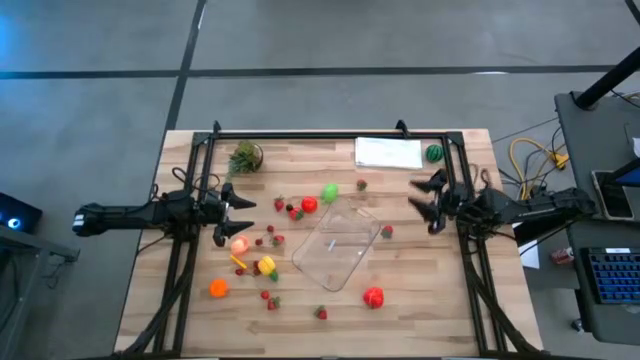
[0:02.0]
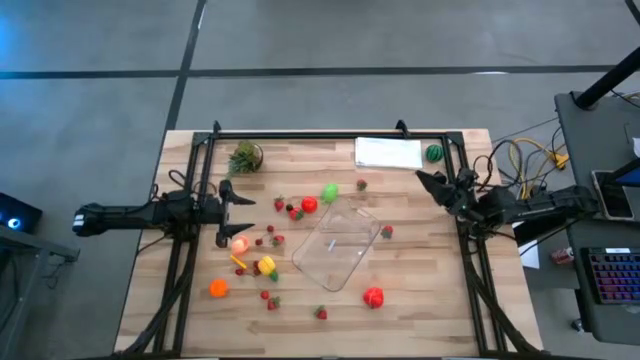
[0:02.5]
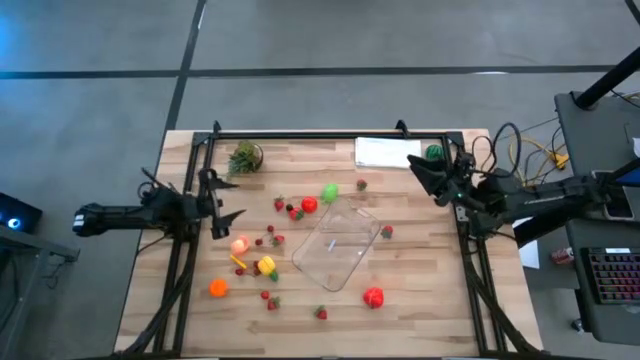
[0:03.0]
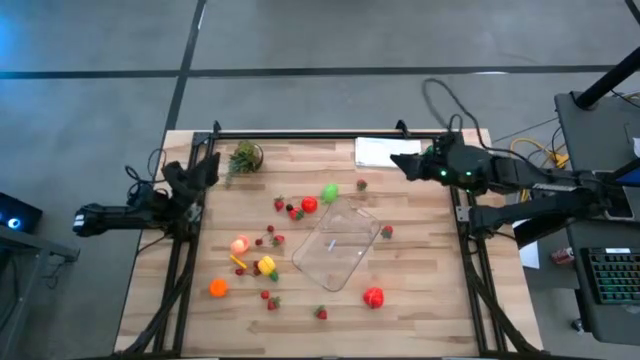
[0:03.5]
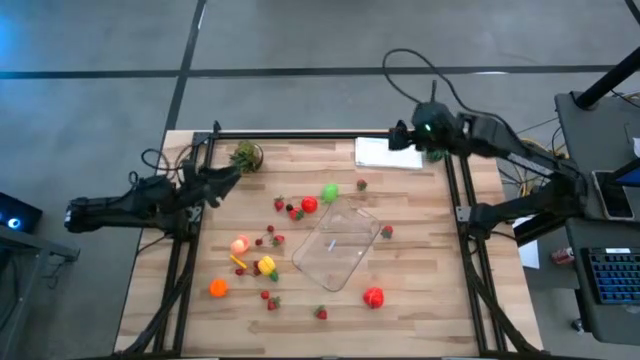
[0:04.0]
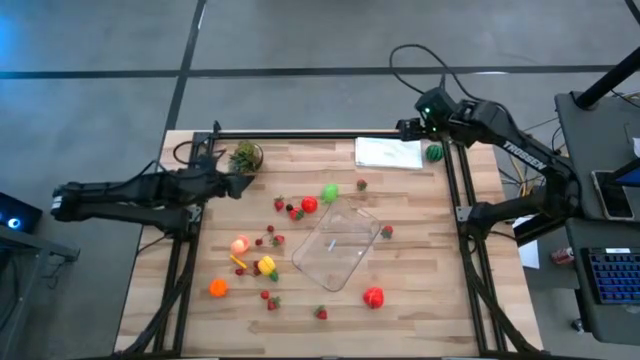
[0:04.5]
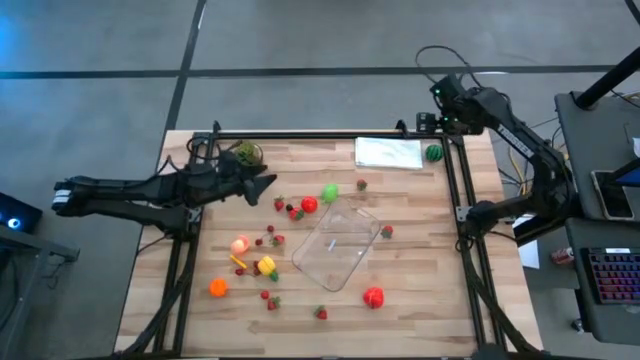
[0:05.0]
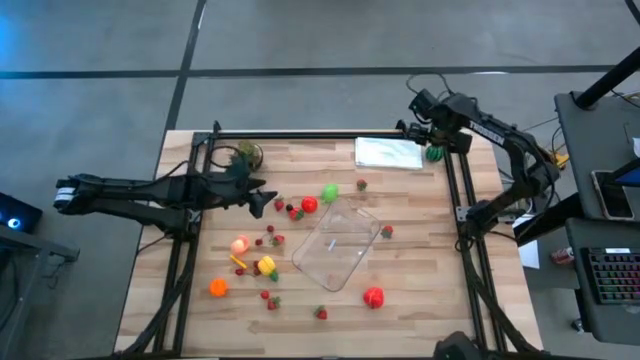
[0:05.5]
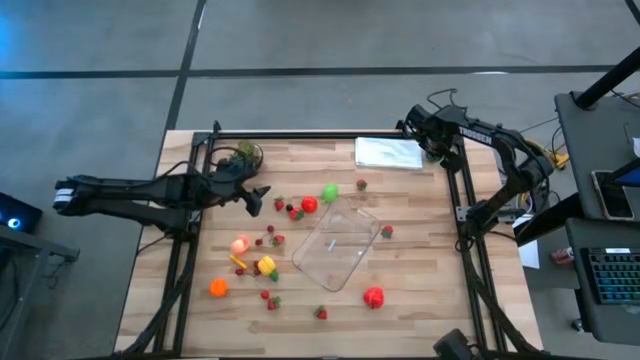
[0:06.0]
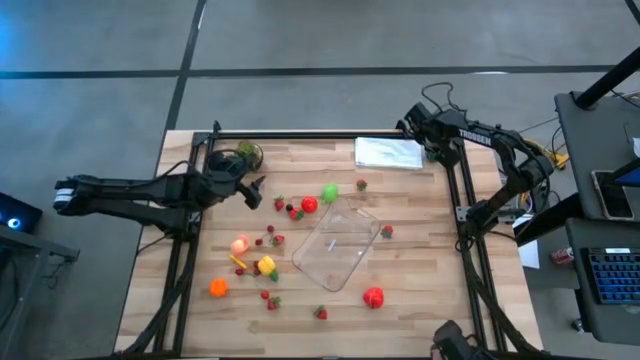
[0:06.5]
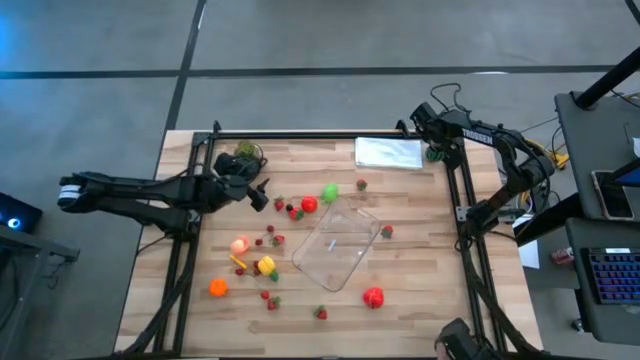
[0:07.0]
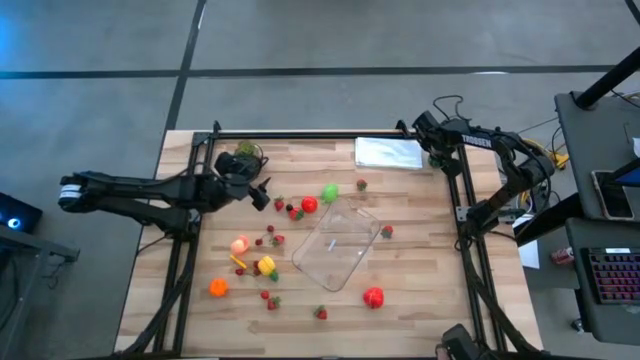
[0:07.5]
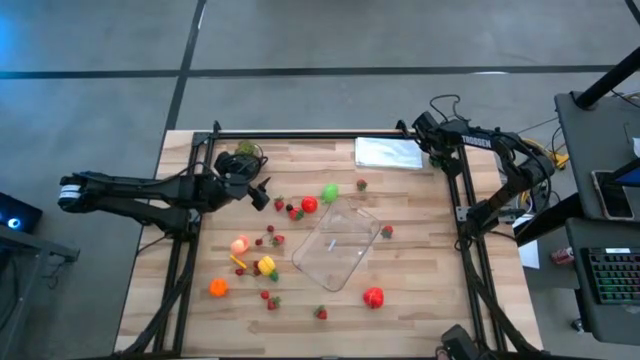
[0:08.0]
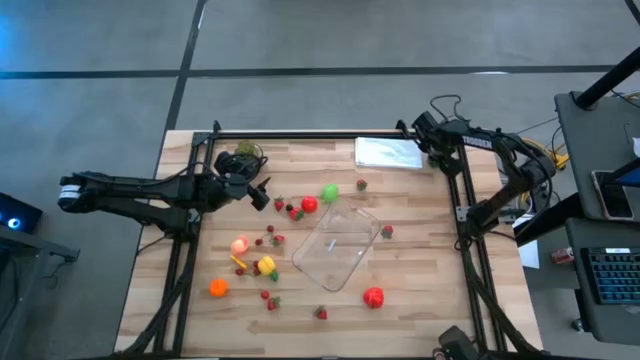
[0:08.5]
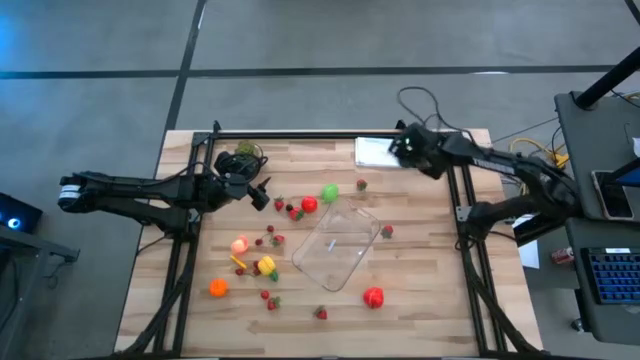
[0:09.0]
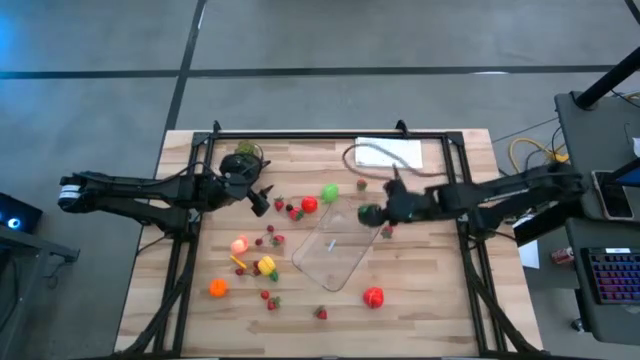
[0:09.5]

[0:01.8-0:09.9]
Task: Pick and placing Produce into tupperware
Put the green watermelon into the transparent bin

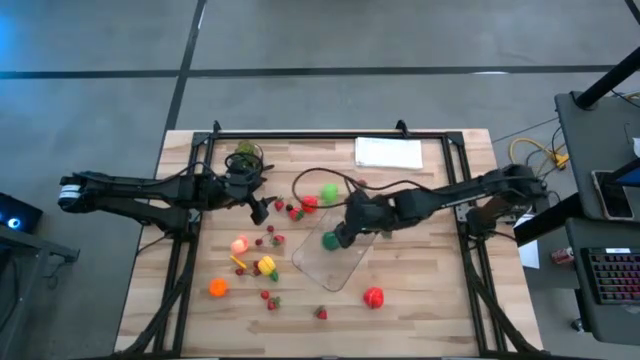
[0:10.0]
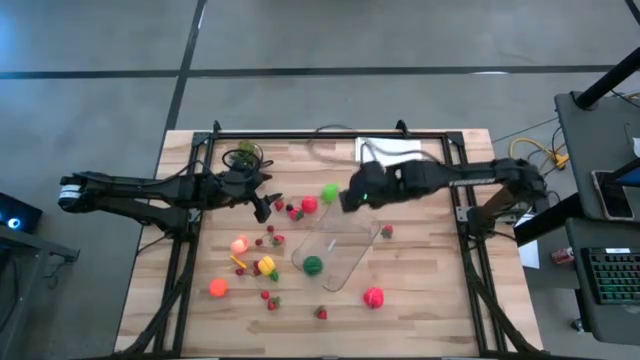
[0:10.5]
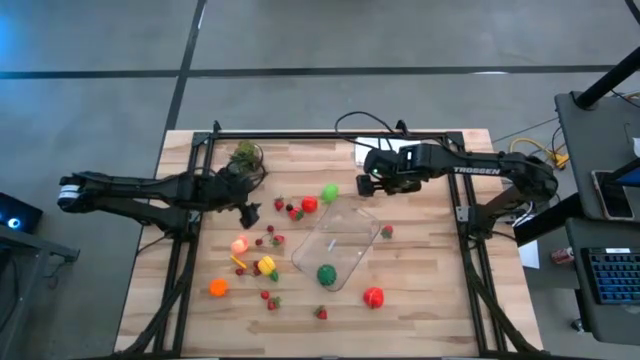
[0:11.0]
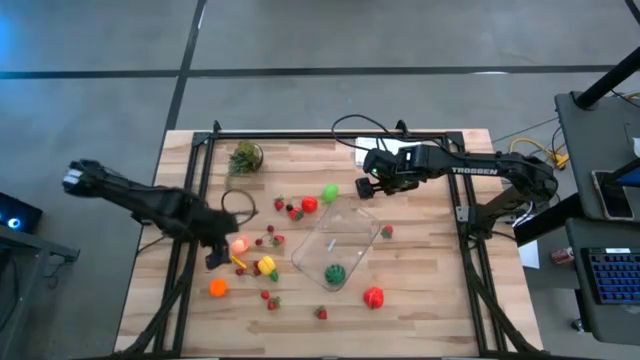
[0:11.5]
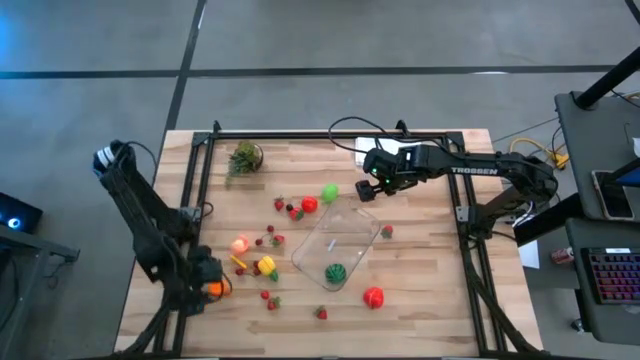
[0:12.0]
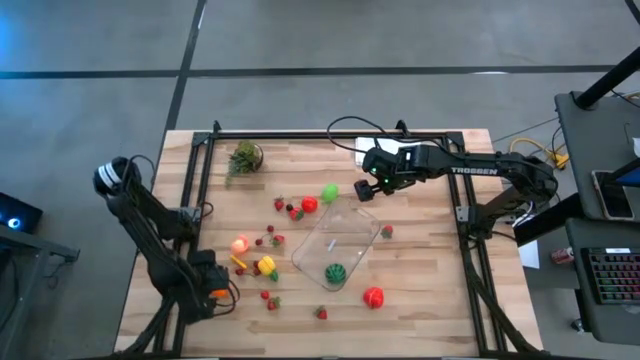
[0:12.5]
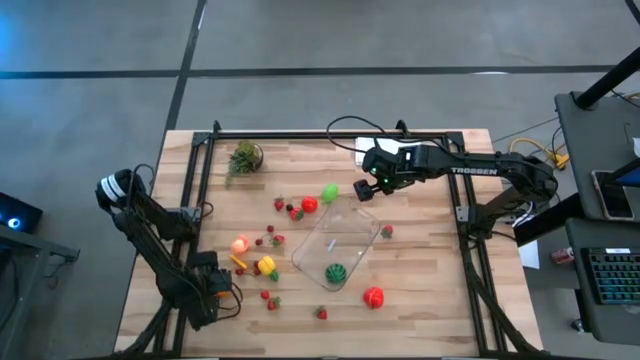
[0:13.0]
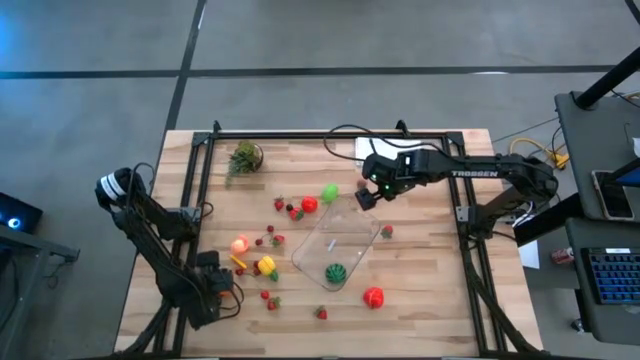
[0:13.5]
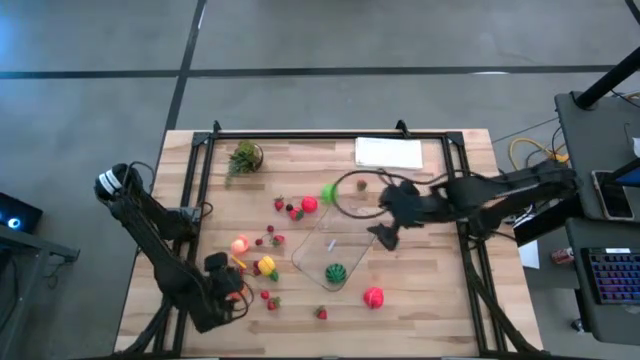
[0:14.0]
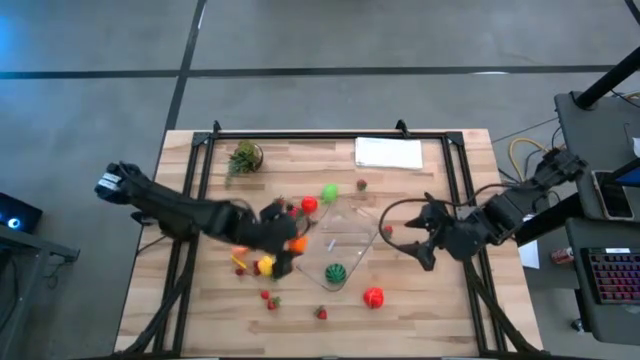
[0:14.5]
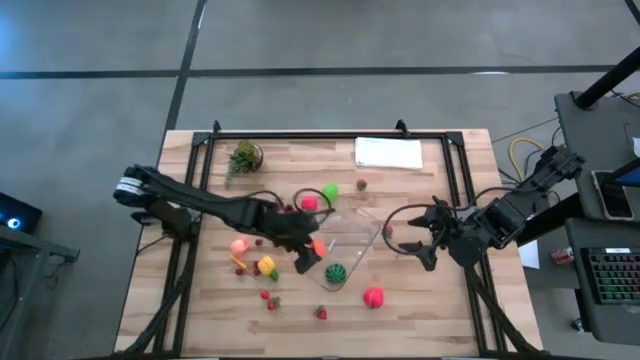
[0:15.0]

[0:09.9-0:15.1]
Put the orange pumpkin into the transparent bin

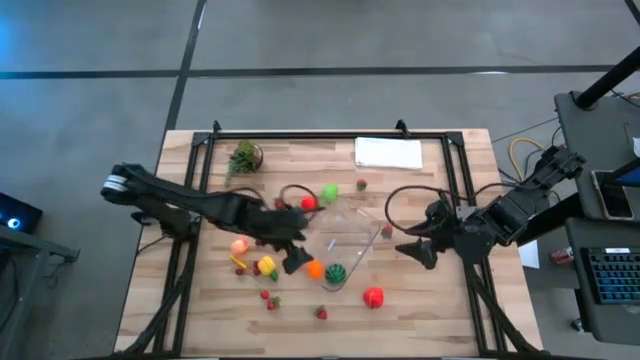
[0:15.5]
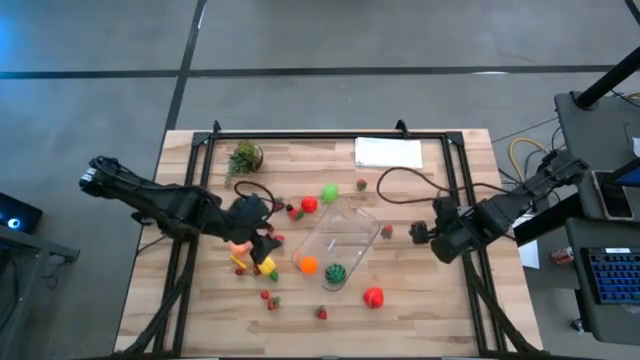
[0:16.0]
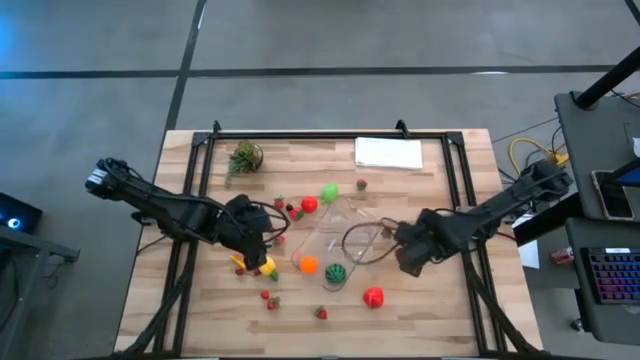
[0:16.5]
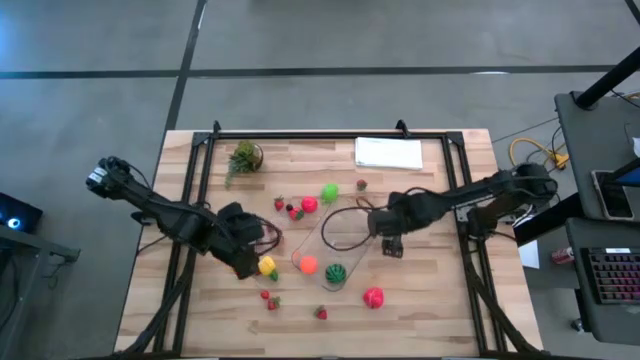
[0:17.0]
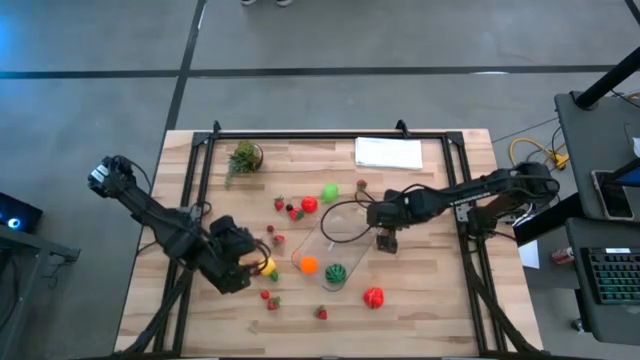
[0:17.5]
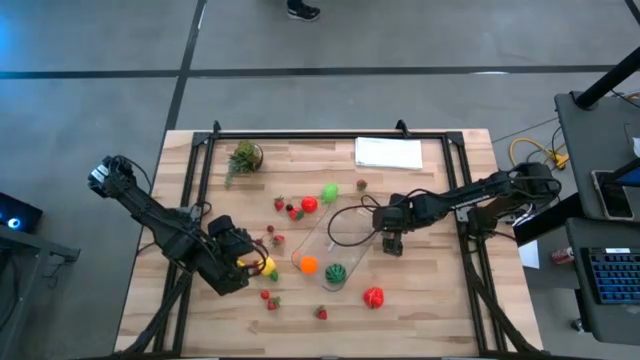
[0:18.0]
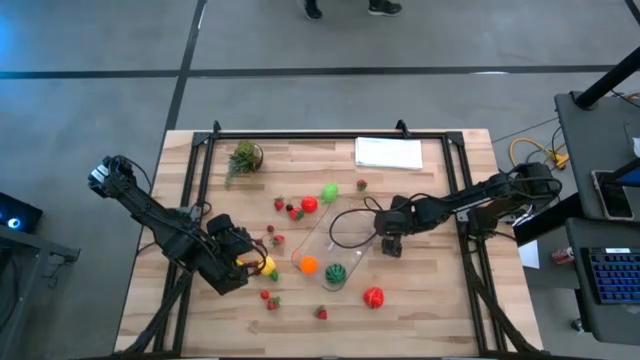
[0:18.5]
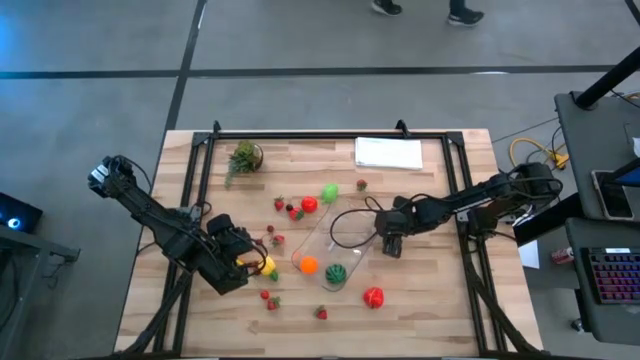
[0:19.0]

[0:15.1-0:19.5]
Put the red strawberry into the transparent bin

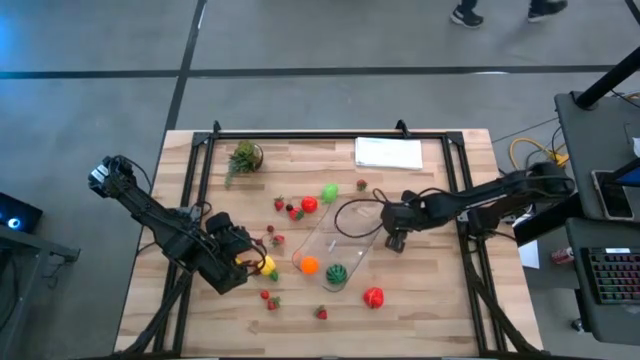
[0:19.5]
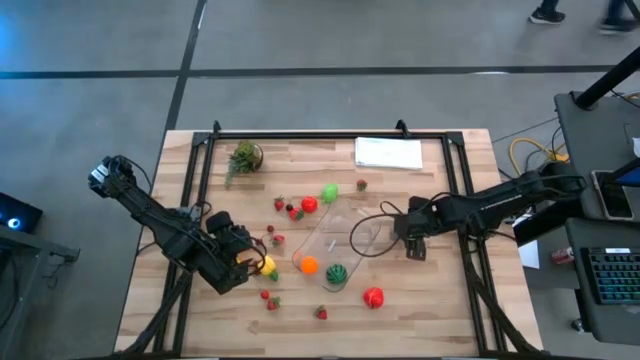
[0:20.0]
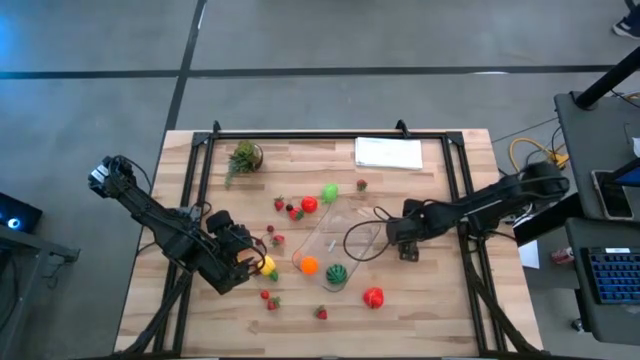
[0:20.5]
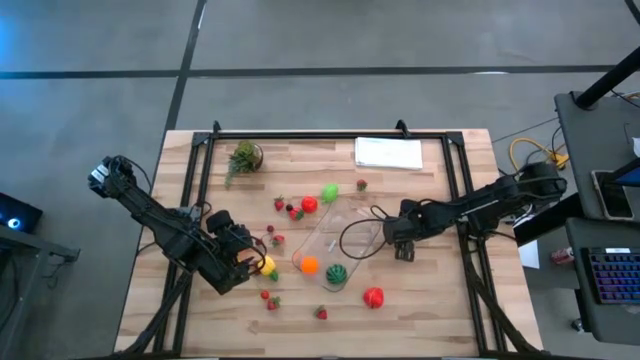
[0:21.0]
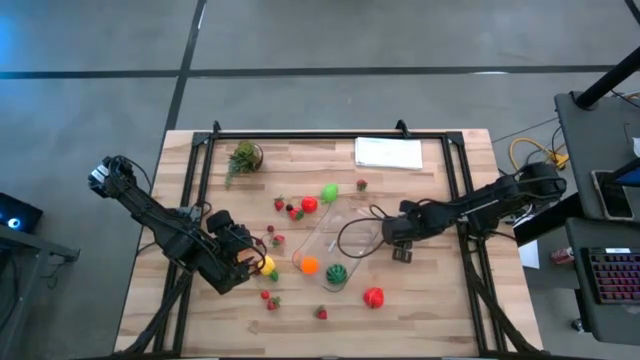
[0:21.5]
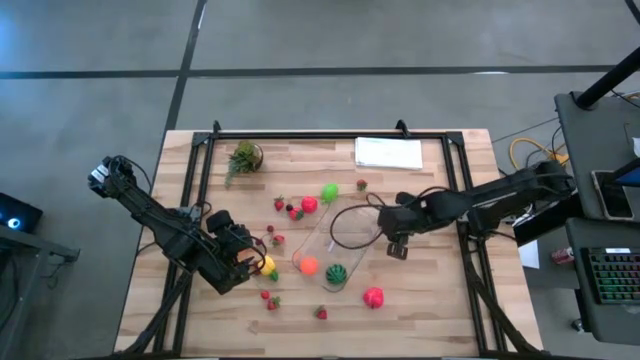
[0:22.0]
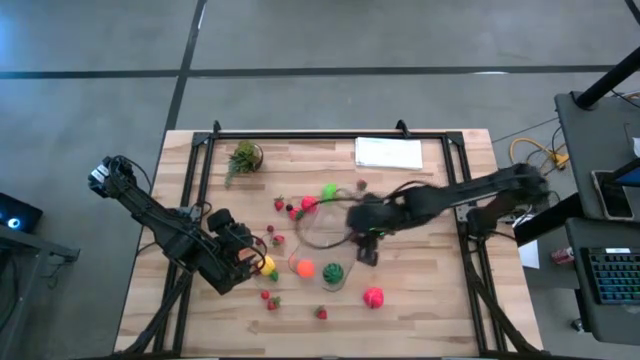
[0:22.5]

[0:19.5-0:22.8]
Put the red strawberry into the transparent bin
